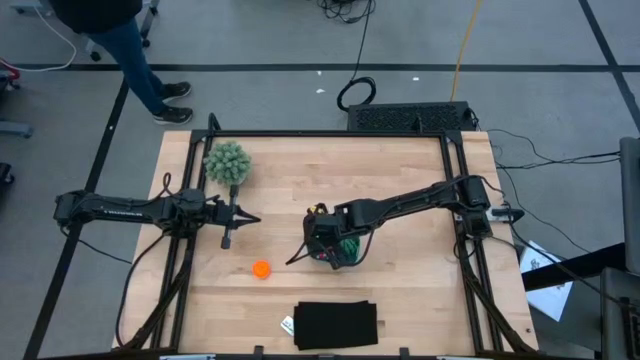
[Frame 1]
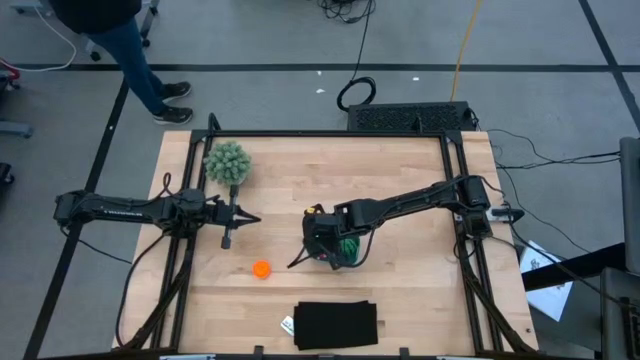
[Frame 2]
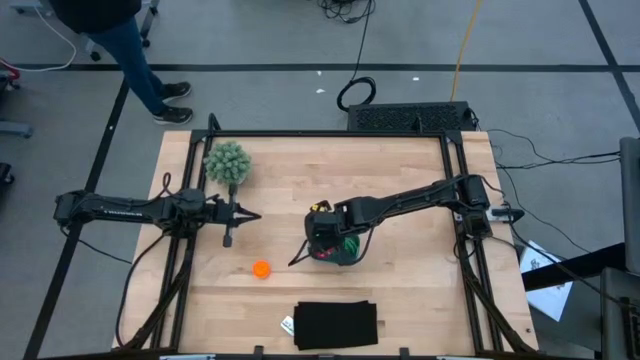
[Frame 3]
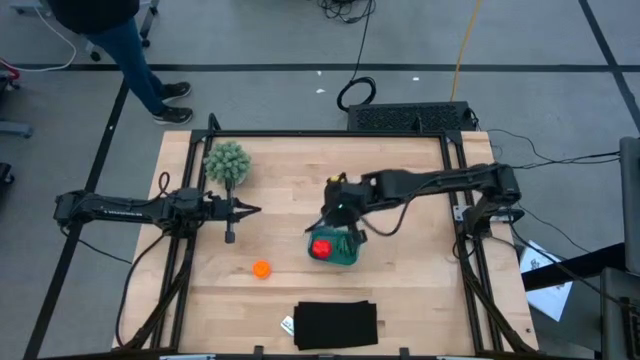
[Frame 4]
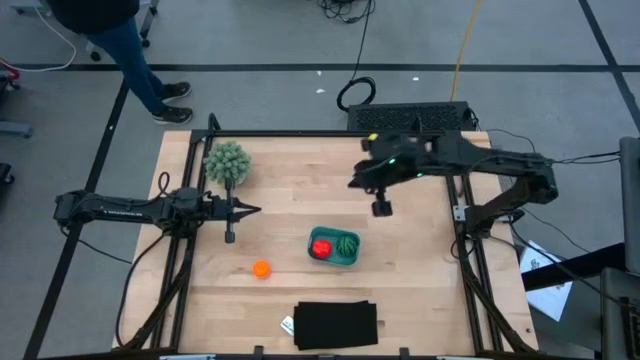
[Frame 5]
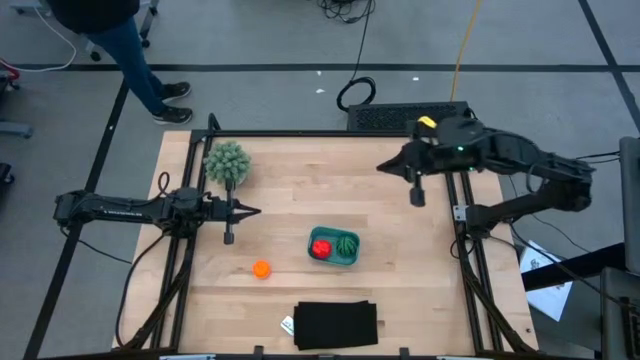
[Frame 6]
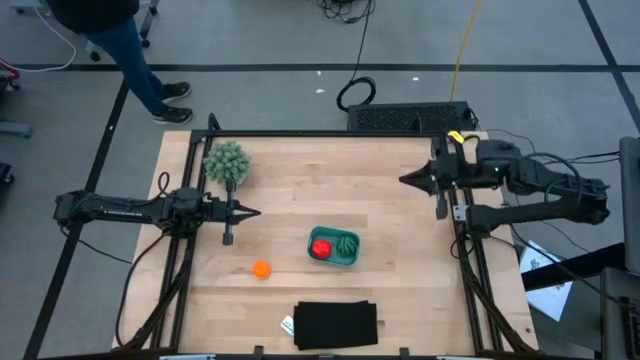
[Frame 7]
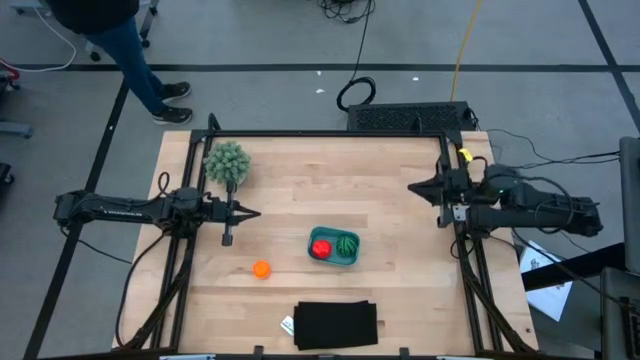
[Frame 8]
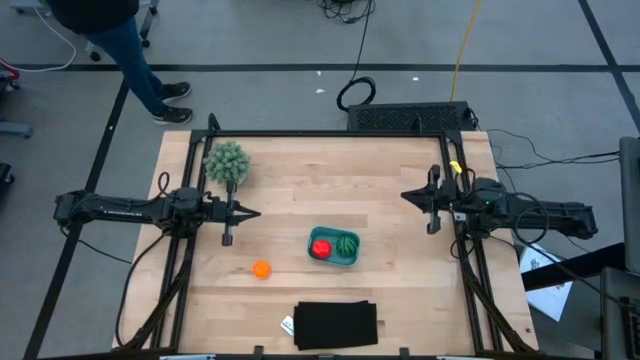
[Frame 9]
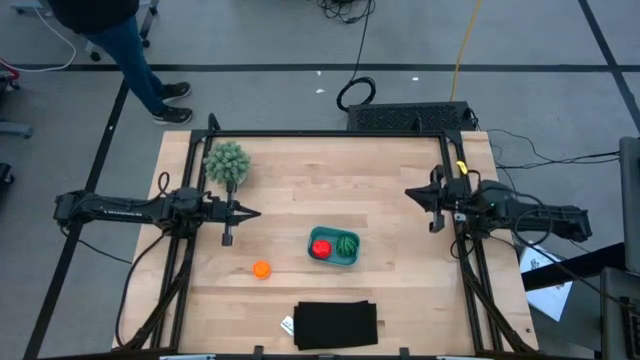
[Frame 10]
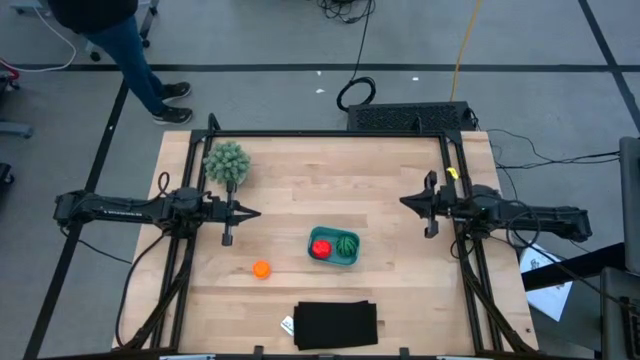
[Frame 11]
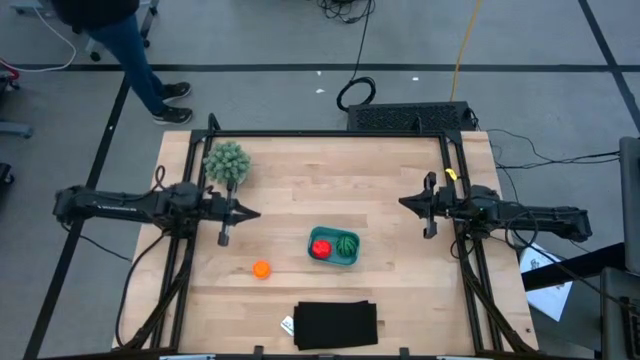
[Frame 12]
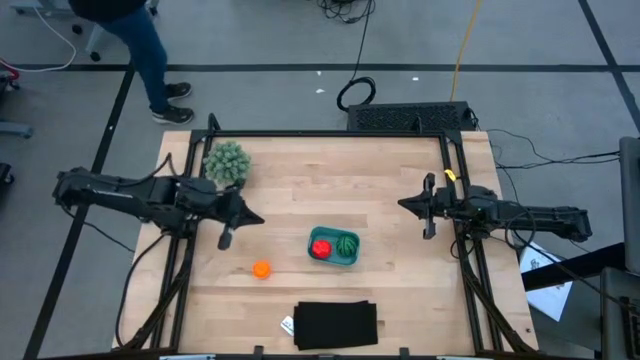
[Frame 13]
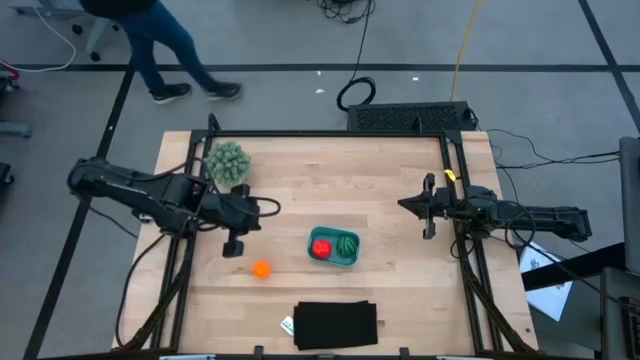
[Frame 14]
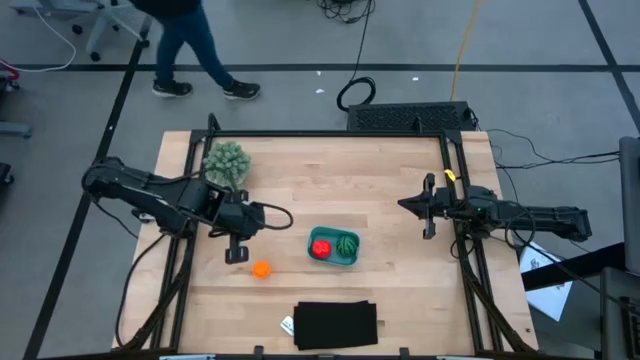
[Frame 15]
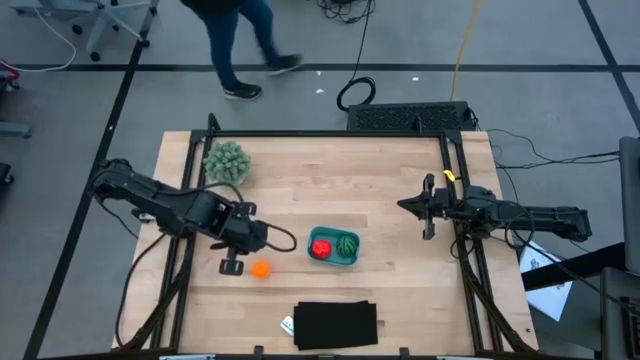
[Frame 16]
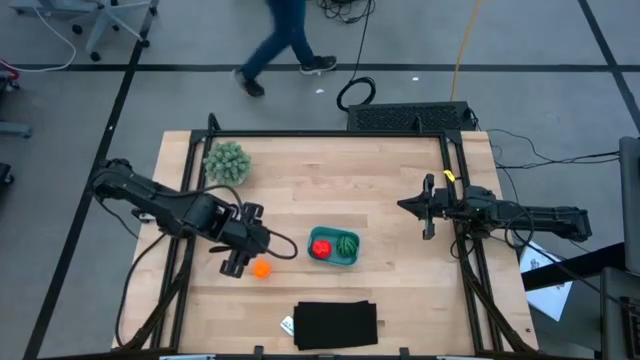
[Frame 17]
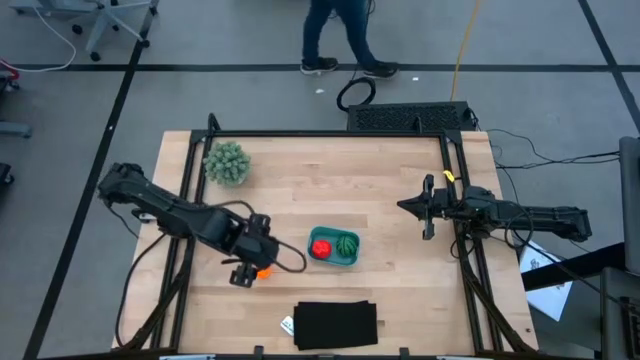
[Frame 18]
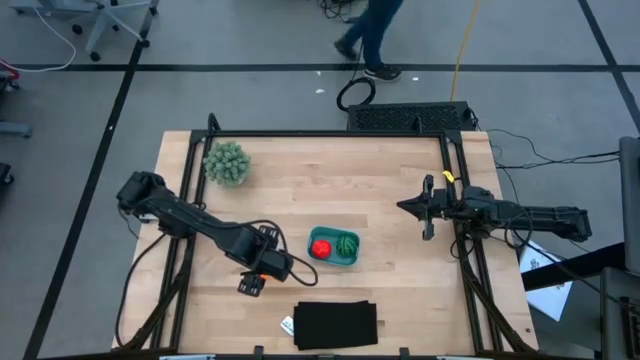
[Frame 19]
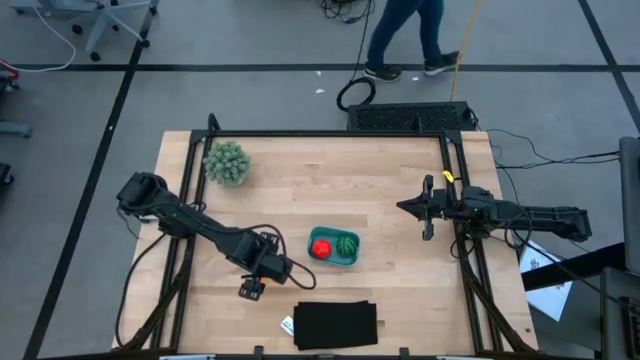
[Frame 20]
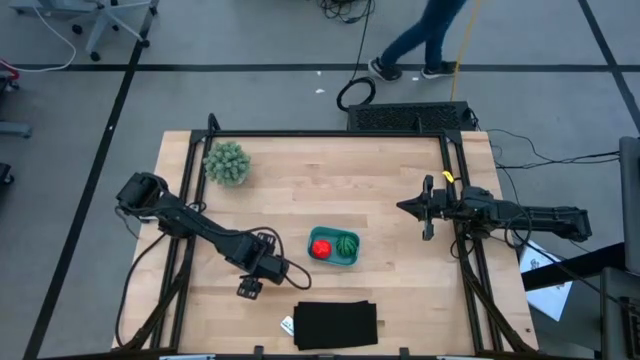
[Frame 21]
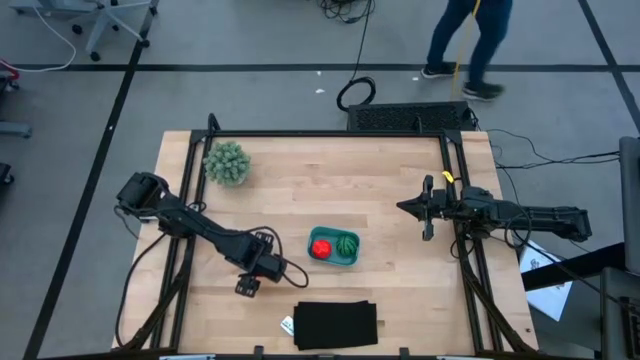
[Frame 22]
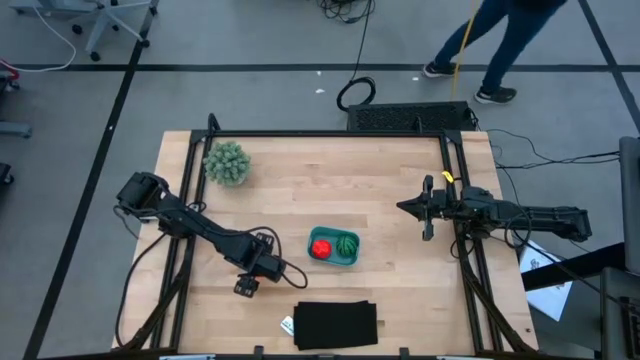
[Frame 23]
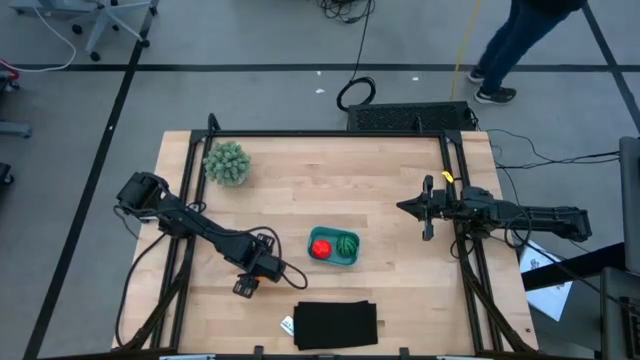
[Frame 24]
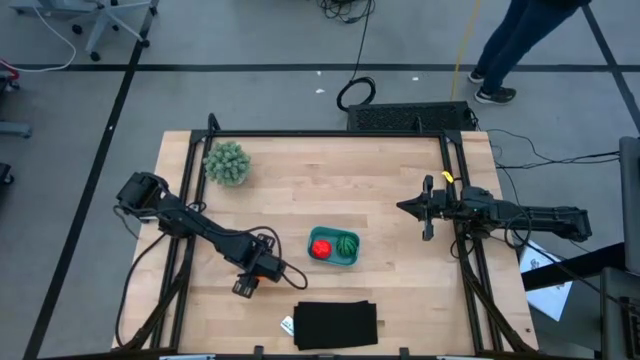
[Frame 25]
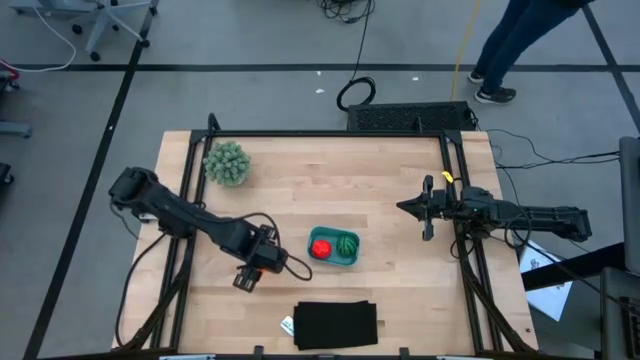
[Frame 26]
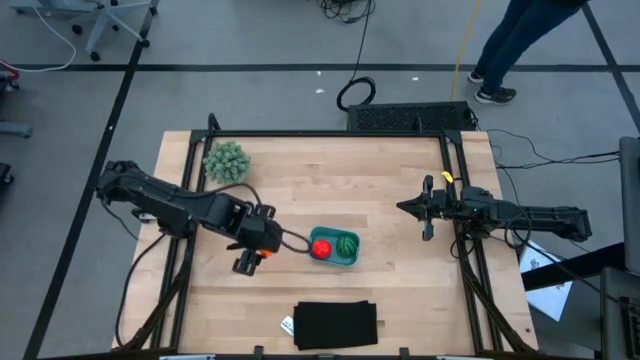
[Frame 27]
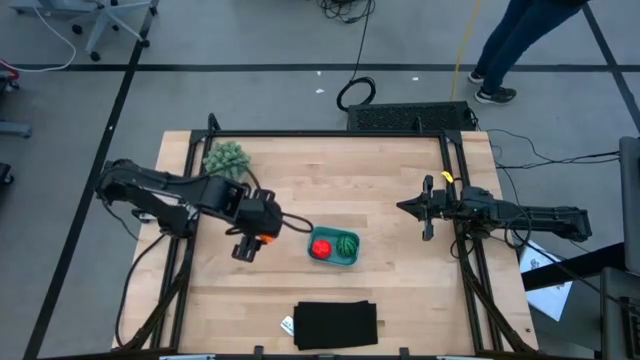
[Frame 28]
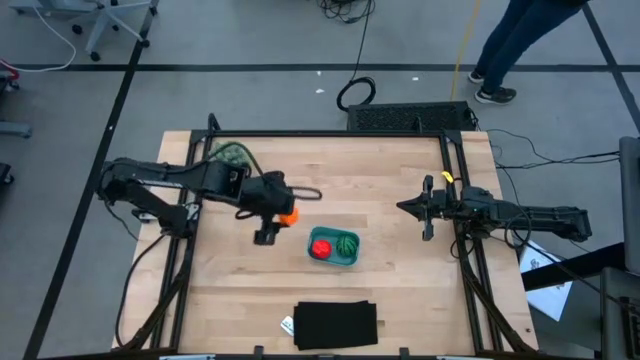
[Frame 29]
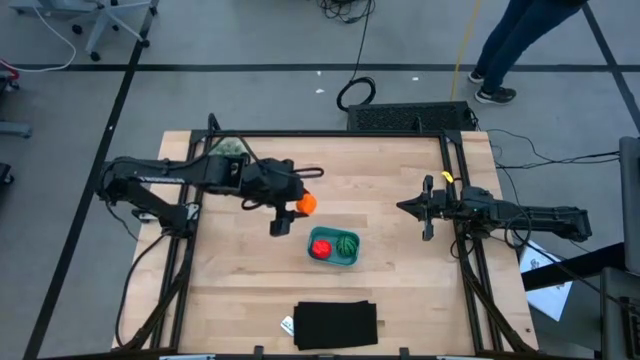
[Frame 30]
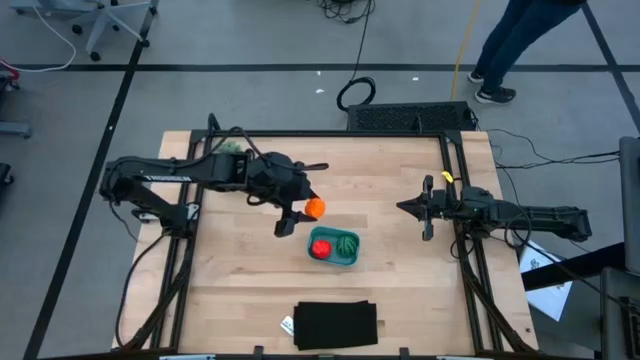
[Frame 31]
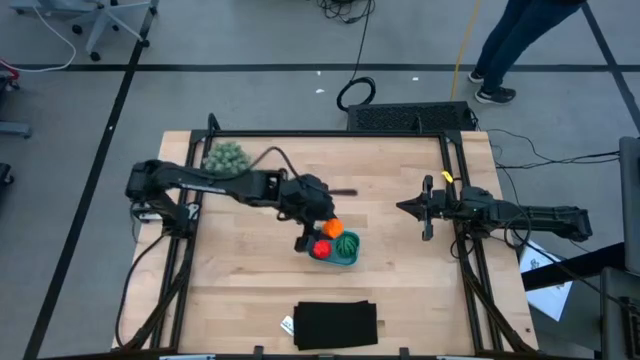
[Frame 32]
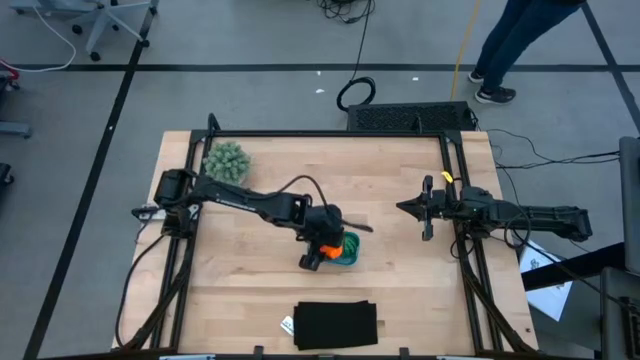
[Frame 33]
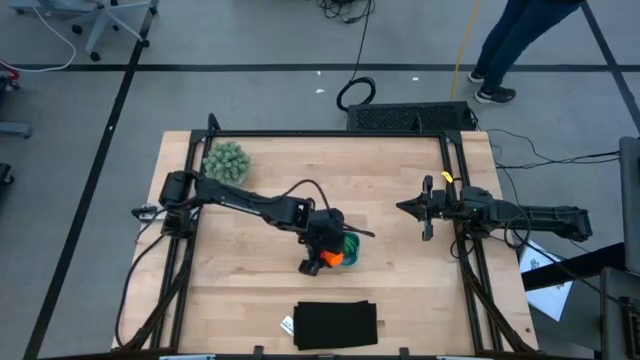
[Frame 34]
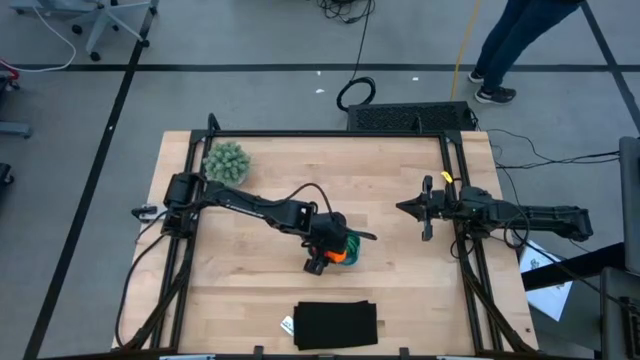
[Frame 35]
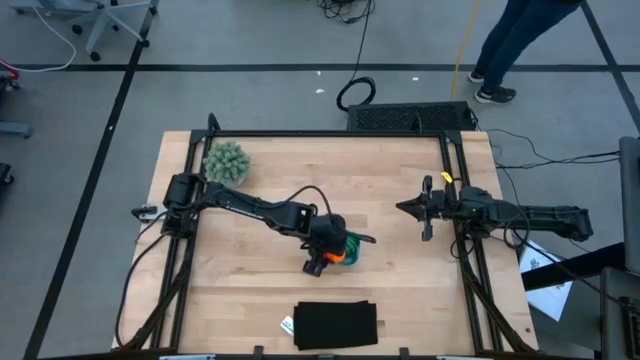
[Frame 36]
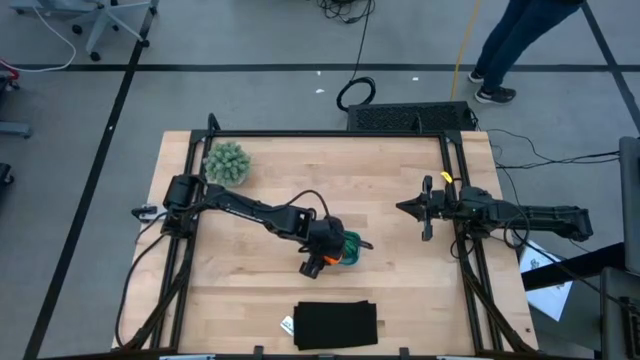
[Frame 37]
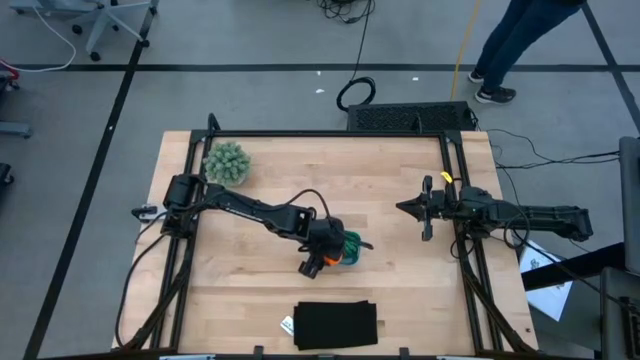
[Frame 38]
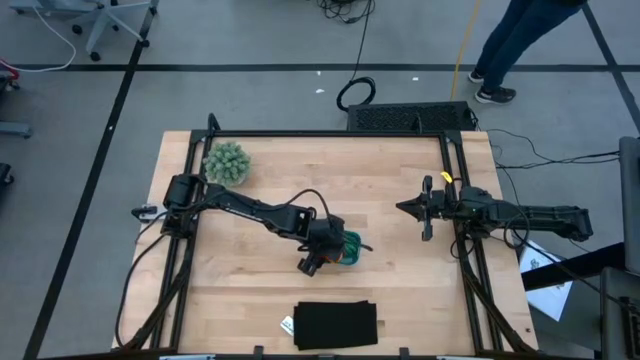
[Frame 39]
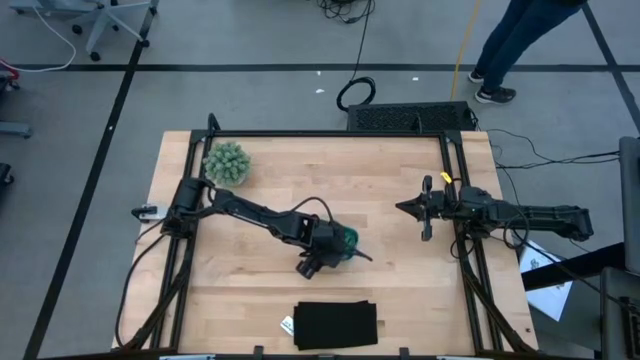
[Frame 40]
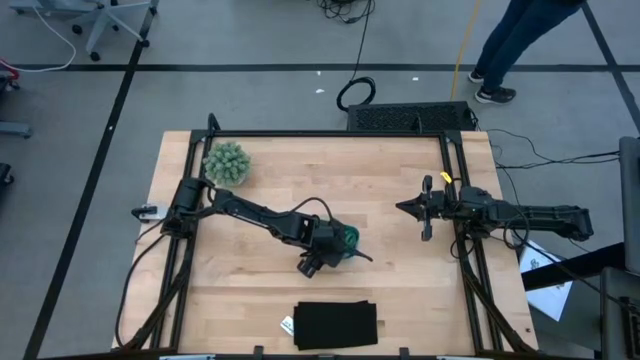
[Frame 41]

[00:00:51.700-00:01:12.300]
Task: Pick and placing Produce into tupperware
Put the pumpkin into the bin

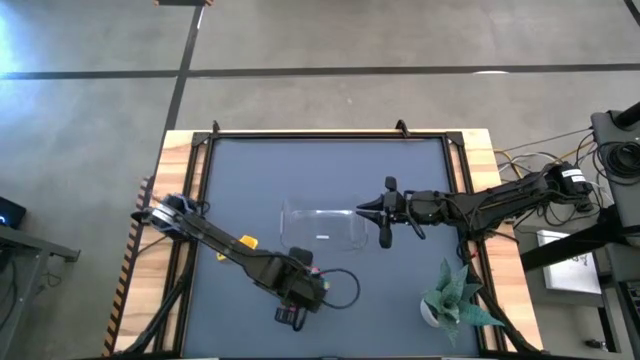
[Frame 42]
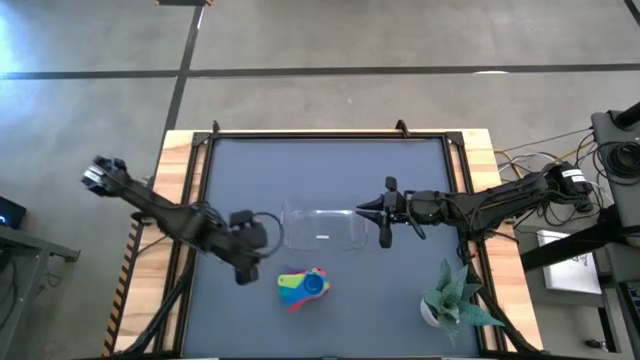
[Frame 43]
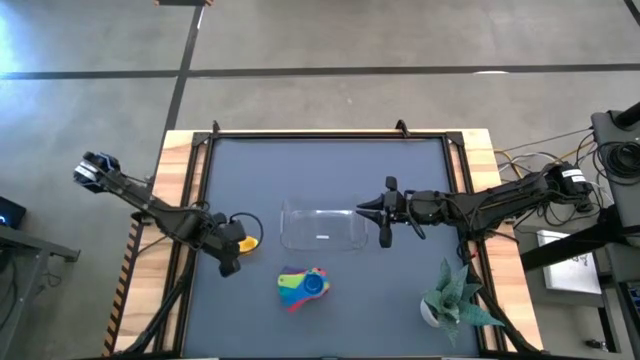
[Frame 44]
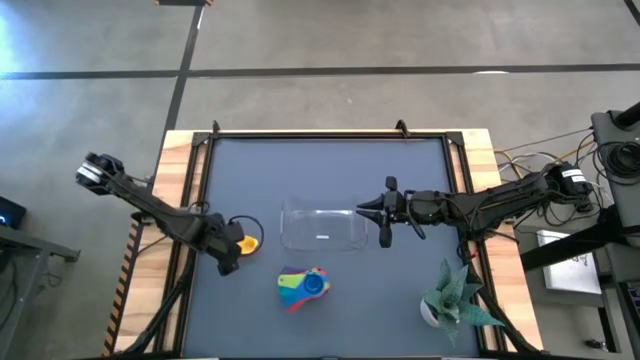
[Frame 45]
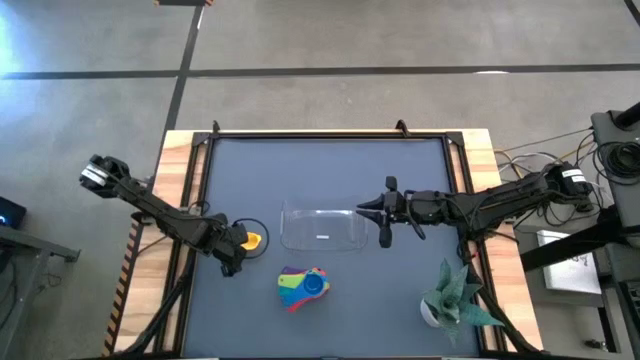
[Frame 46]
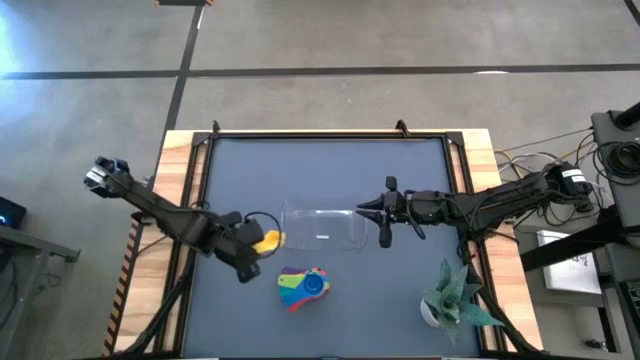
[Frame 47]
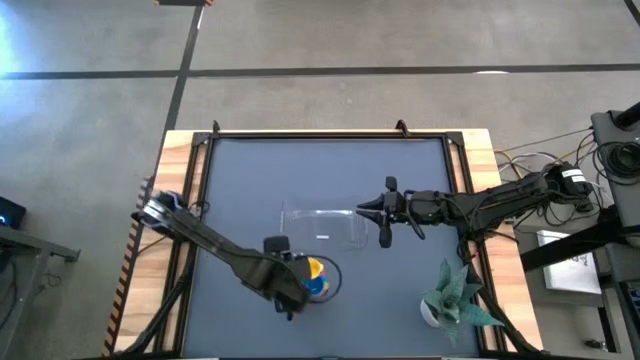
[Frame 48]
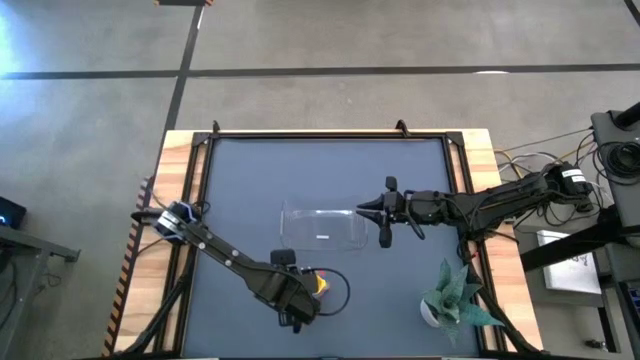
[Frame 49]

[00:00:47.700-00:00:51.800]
Task: Nest measuring cups in basket
Stack the yellow measuring cup on top of the blue measuring cup
